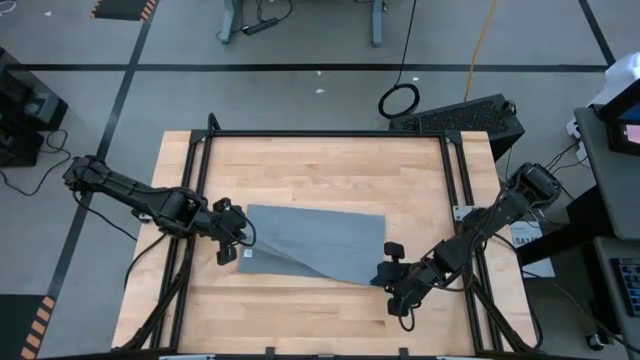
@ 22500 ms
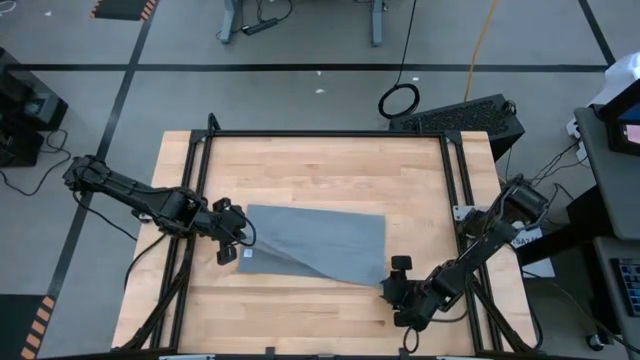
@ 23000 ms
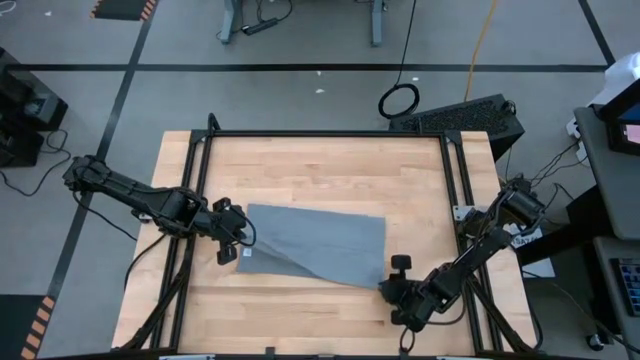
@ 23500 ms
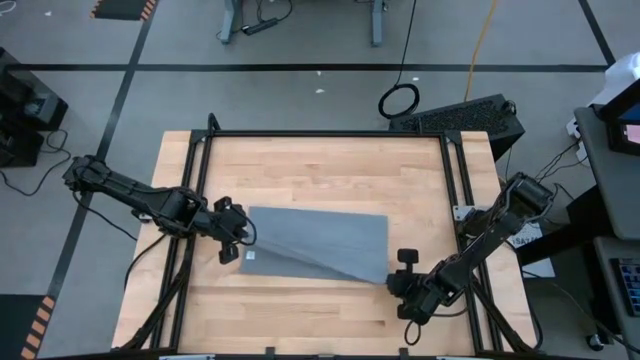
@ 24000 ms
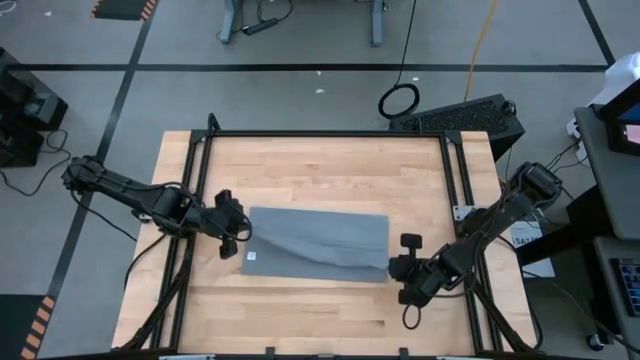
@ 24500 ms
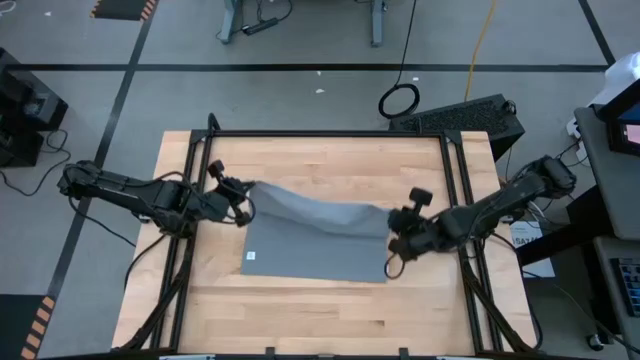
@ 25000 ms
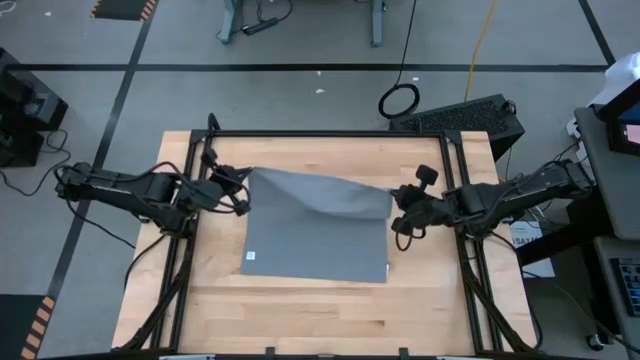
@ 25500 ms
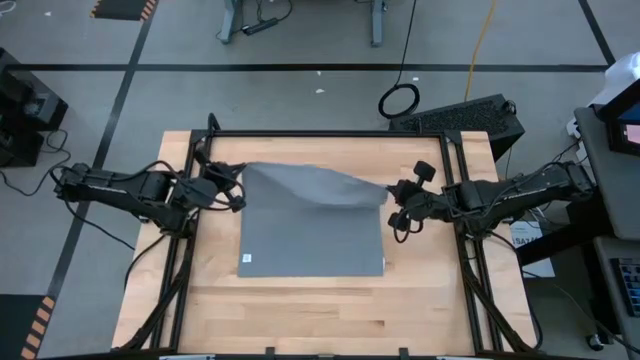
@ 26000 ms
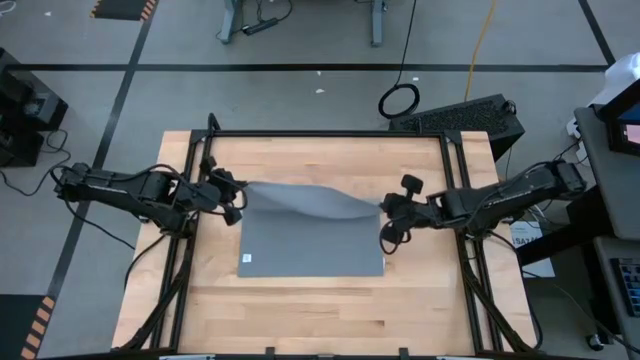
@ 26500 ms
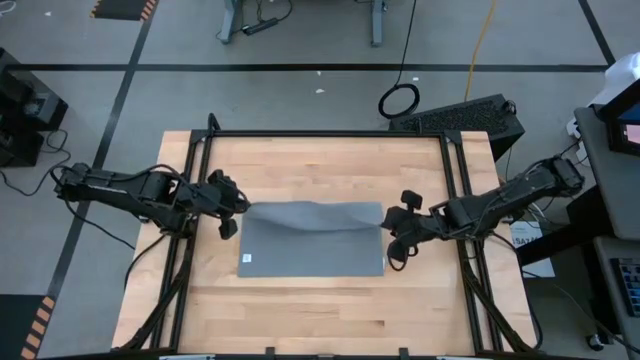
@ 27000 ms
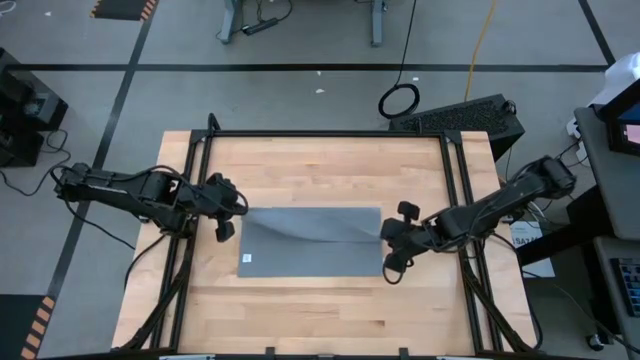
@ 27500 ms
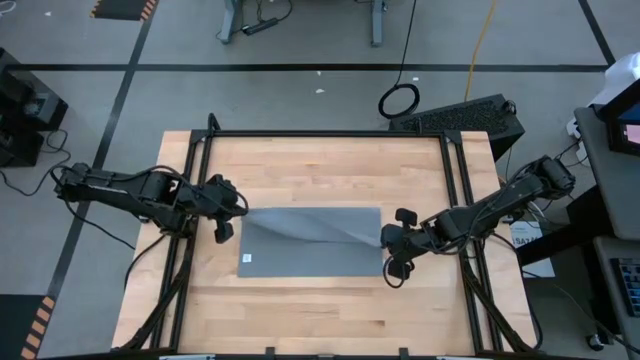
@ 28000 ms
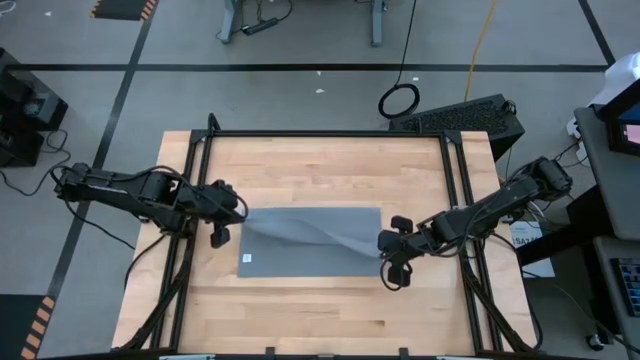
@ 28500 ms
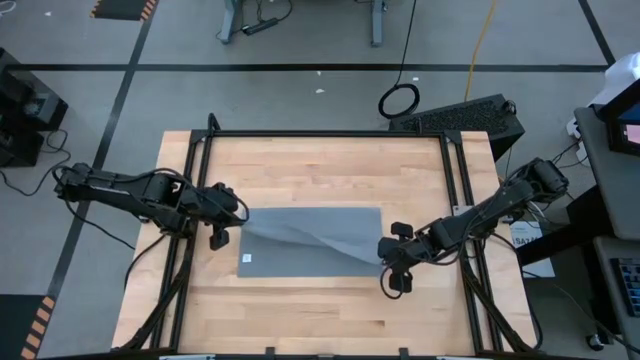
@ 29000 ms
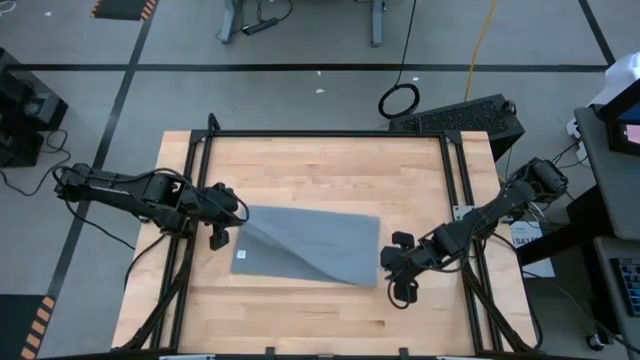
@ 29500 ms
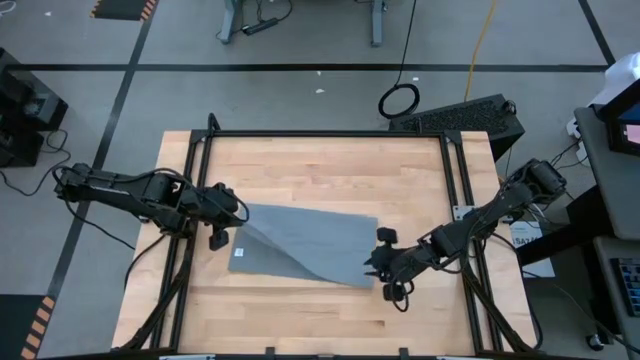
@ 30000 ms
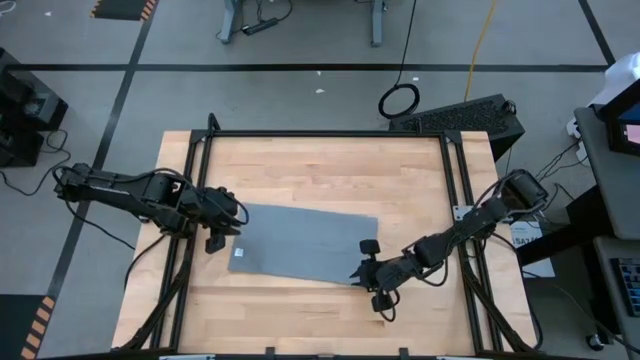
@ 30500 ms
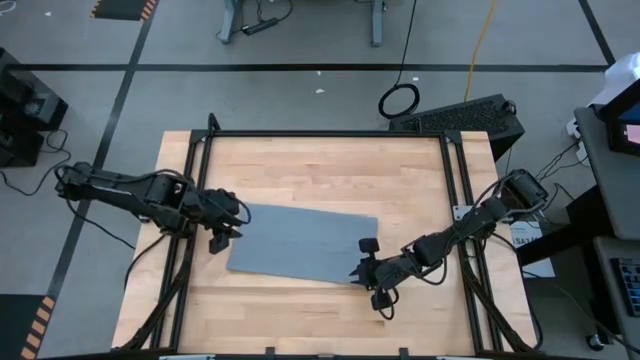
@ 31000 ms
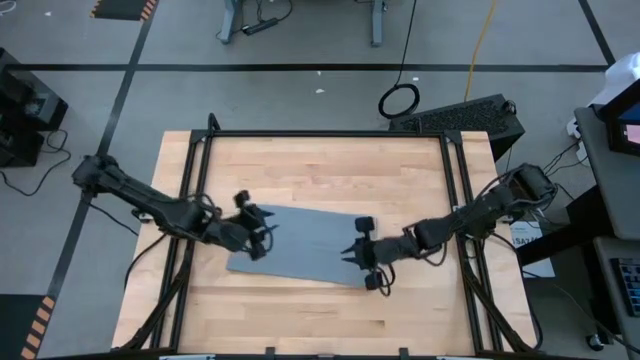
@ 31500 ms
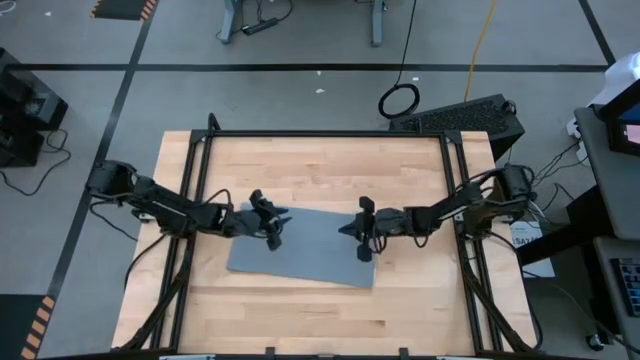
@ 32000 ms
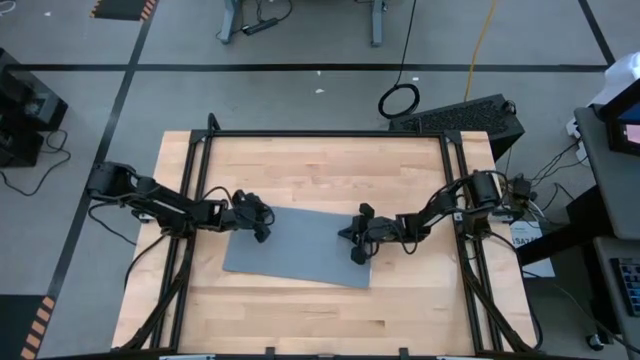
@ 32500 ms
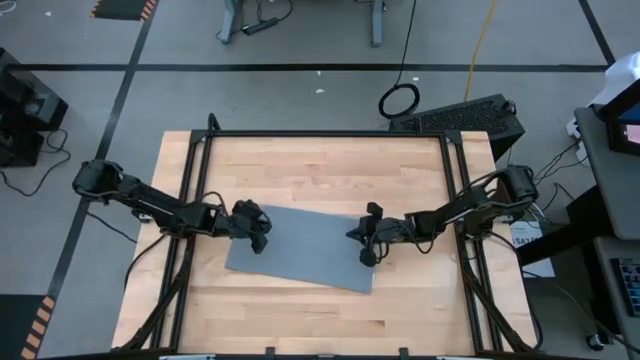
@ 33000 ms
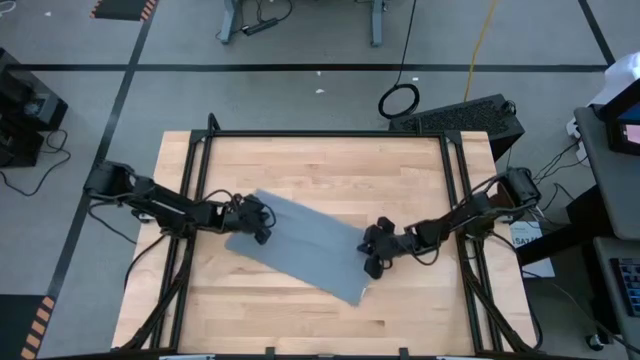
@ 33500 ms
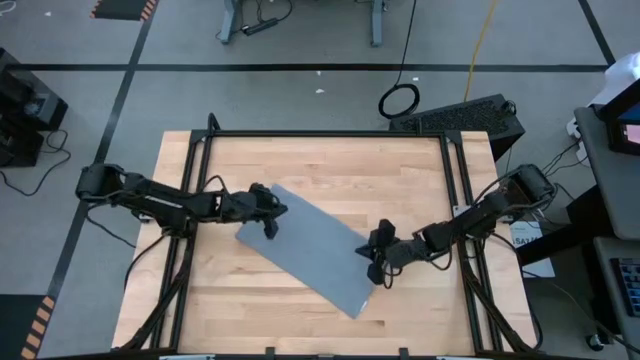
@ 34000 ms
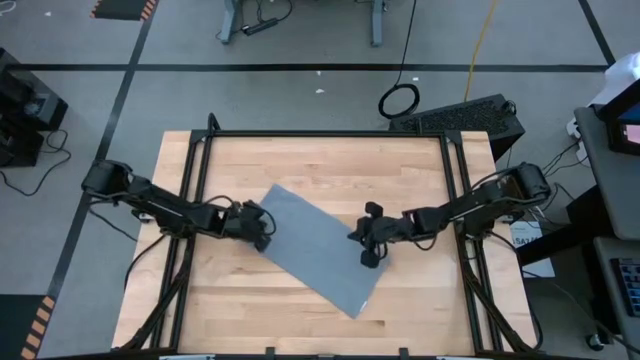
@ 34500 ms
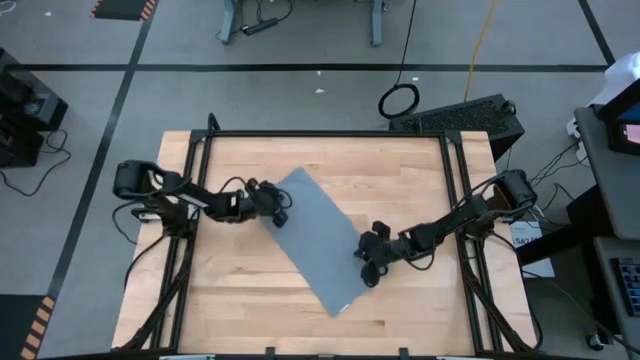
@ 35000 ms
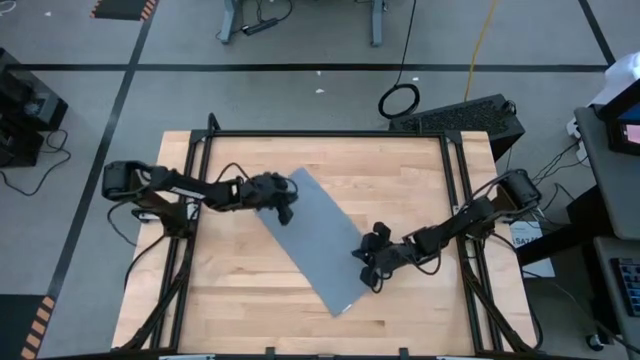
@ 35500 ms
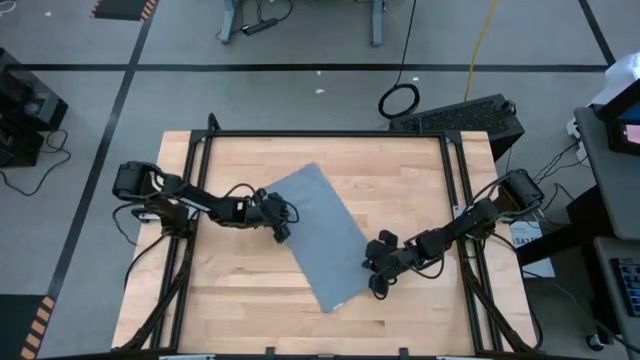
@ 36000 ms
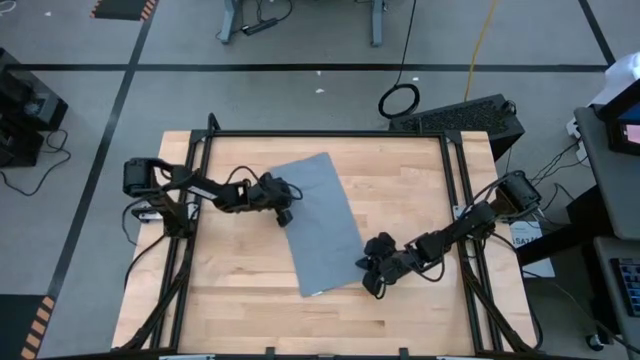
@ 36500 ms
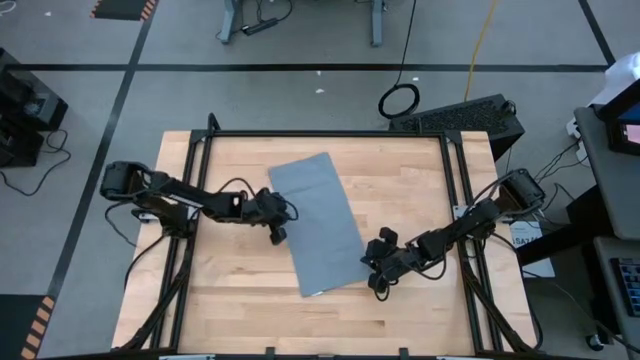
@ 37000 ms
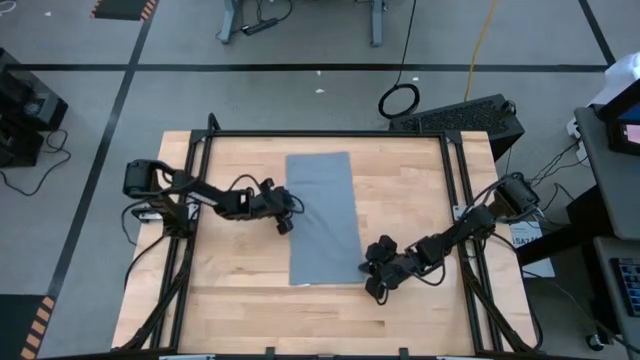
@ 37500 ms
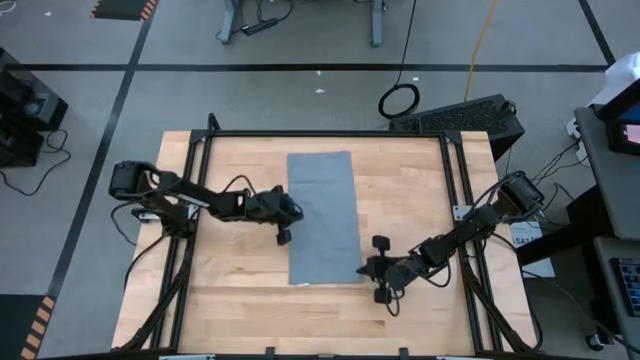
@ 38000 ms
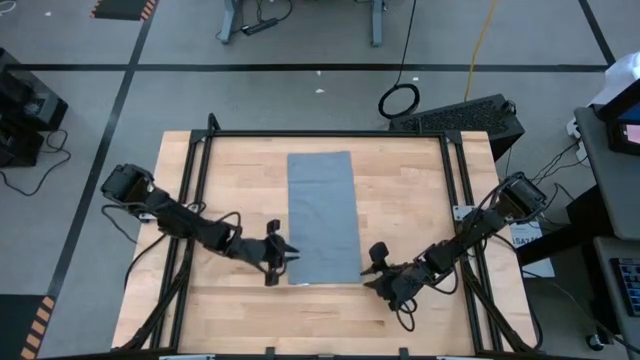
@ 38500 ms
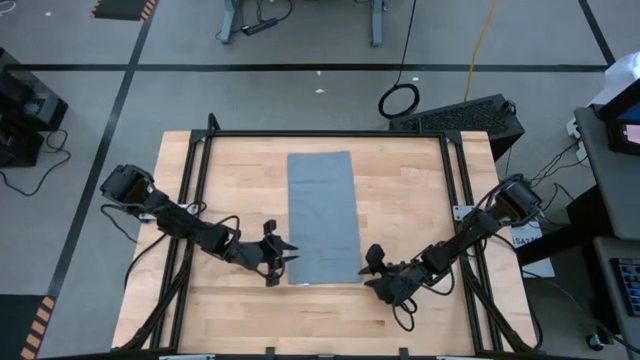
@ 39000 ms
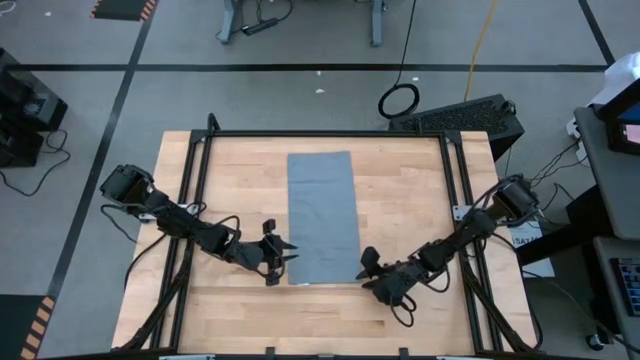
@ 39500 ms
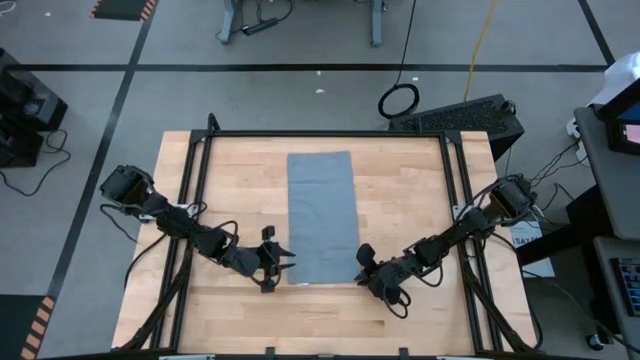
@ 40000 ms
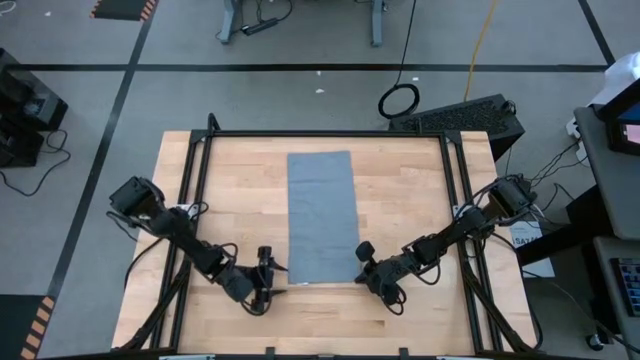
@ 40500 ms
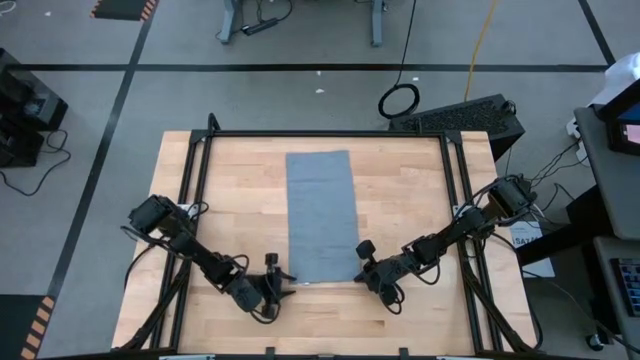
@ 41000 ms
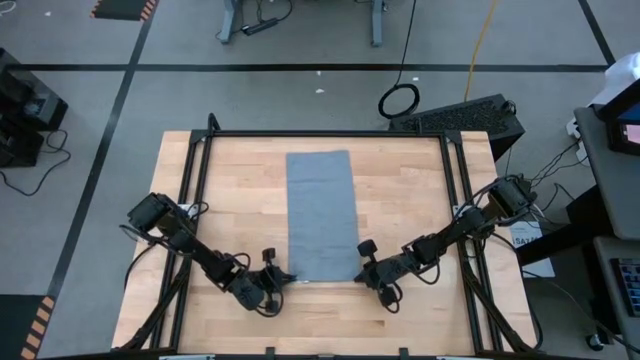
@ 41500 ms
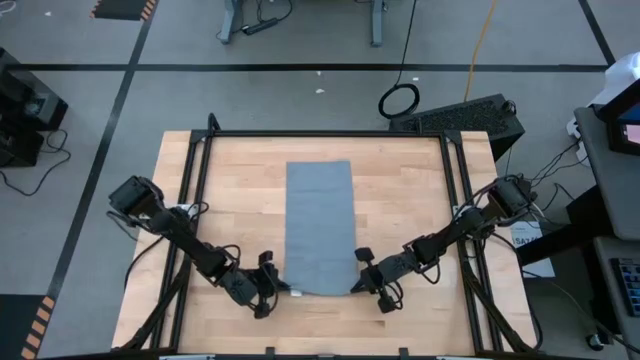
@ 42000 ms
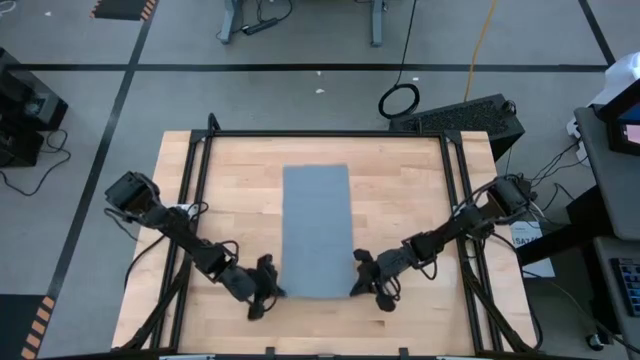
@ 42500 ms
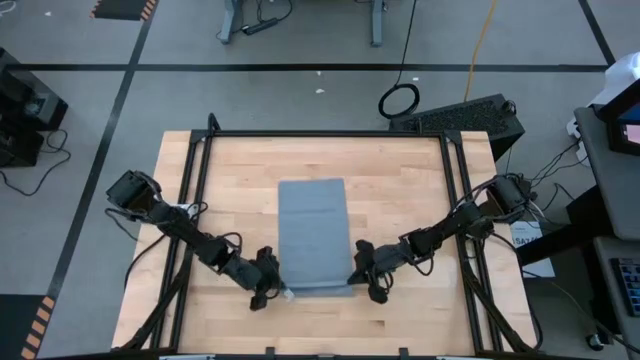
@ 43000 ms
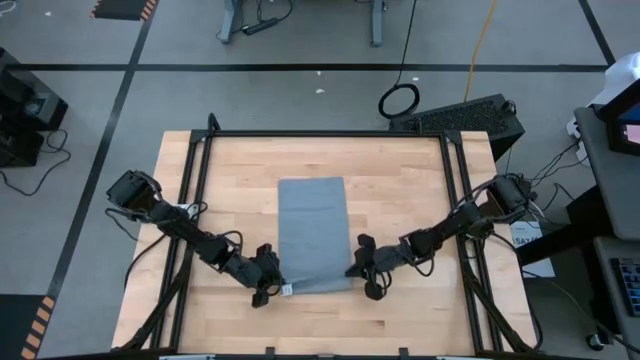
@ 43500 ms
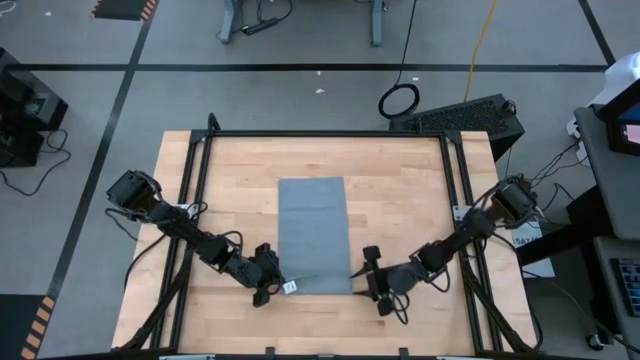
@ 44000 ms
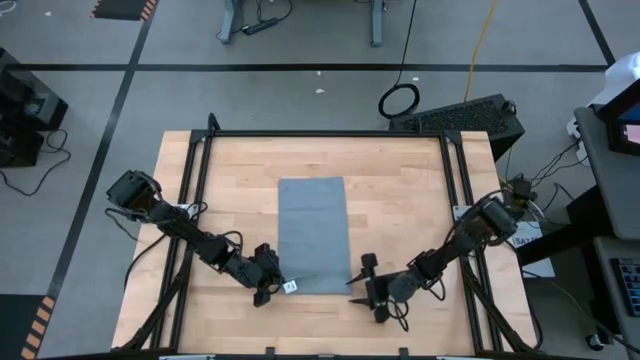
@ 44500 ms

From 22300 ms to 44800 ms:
Task: Roll towel
Roll the gray towel
